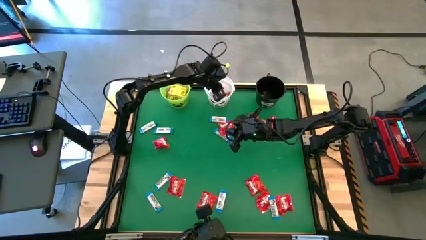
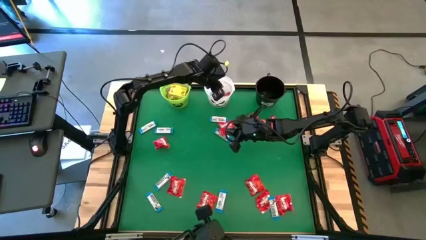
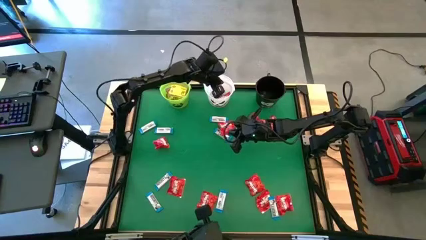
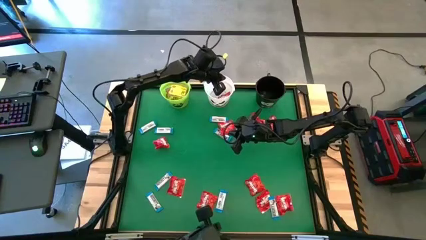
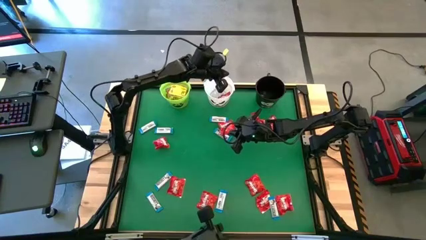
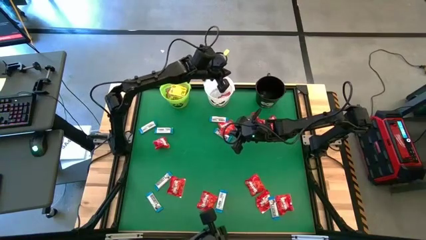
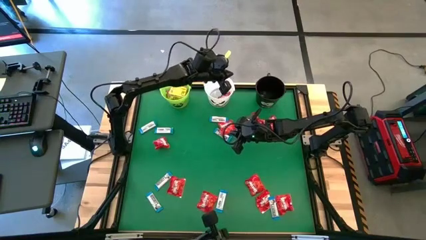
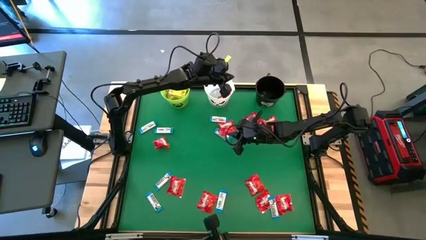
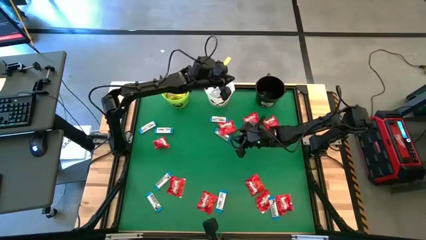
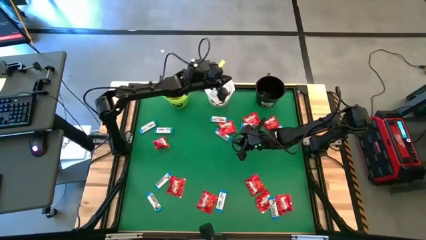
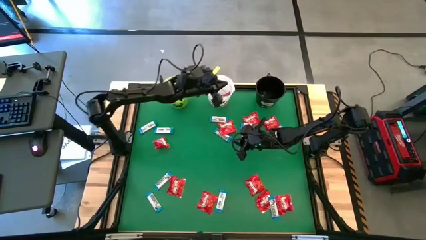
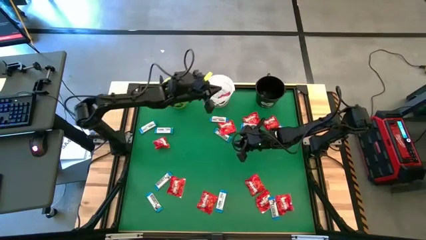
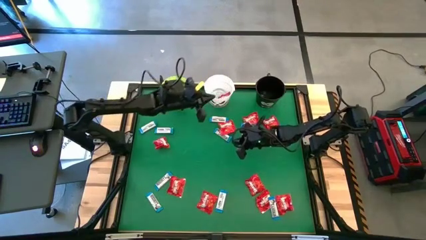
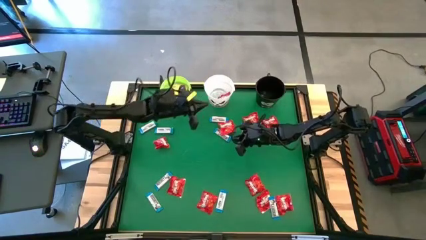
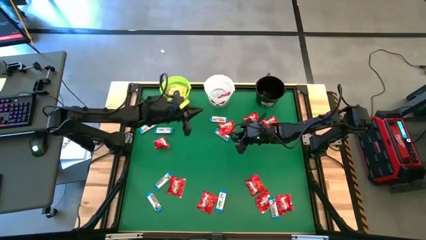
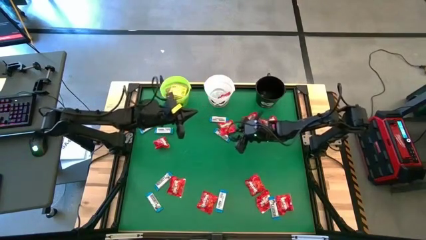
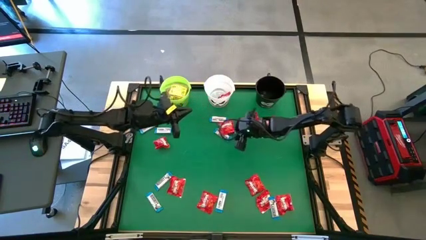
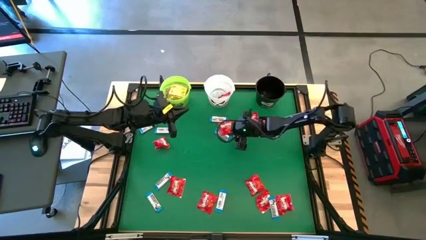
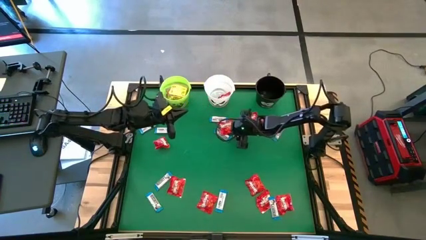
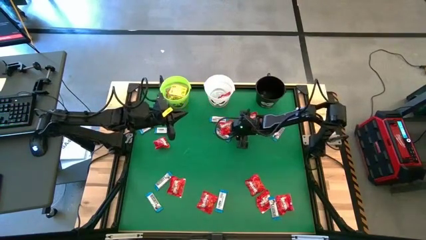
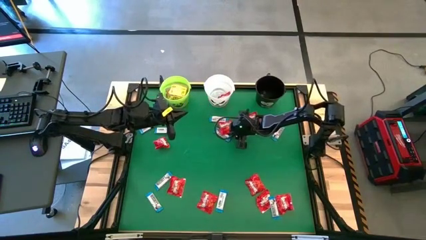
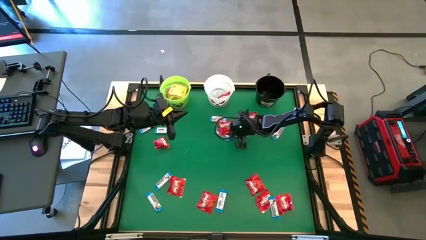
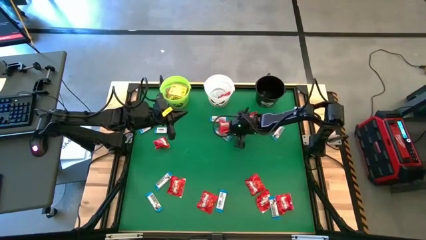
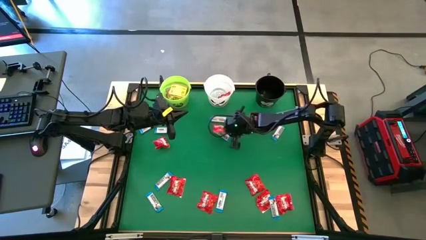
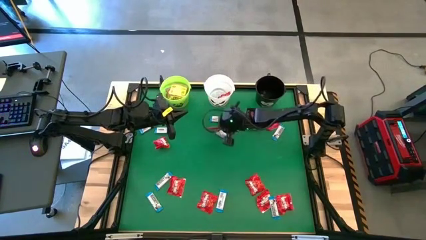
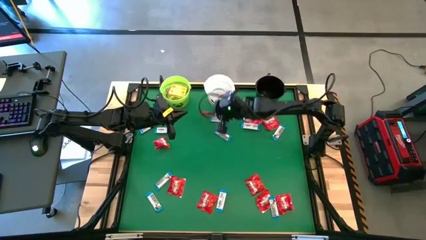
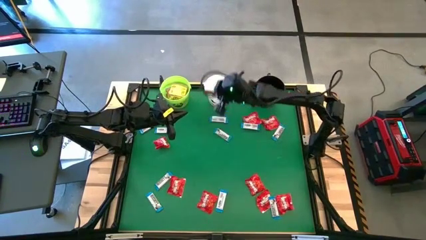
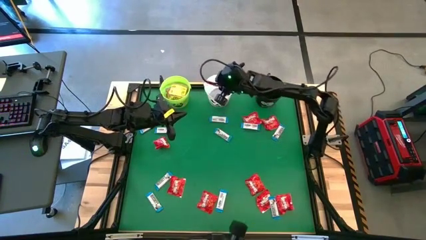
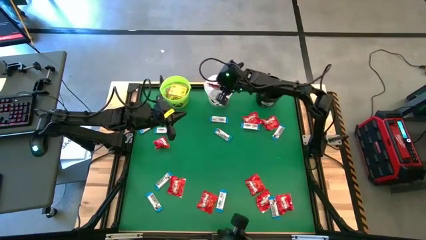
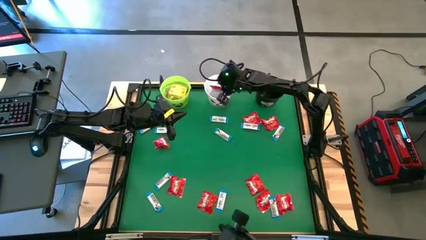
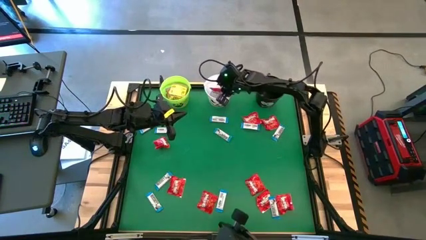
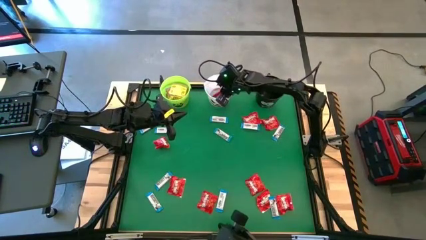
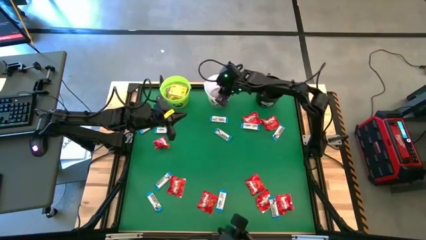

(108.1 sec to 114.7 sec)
Task: Sort candy by brand, put in halloween buckets
Put the red candy into the white bucket

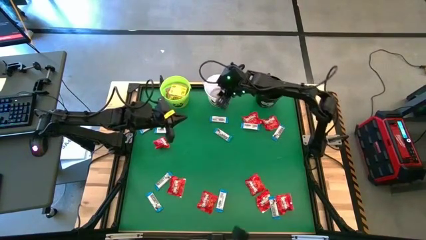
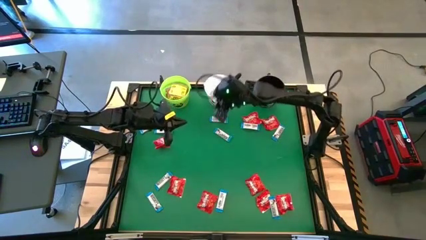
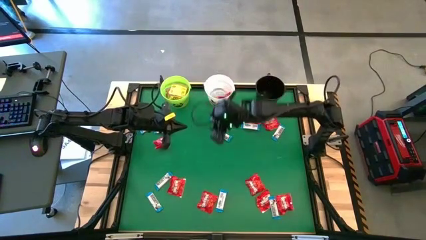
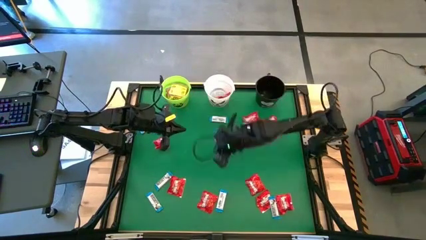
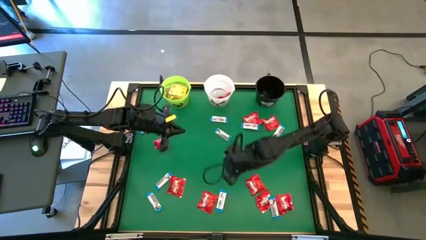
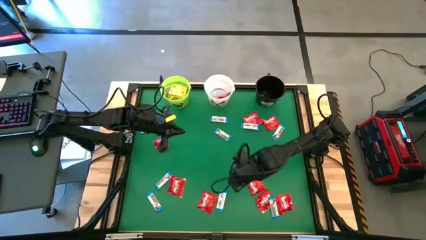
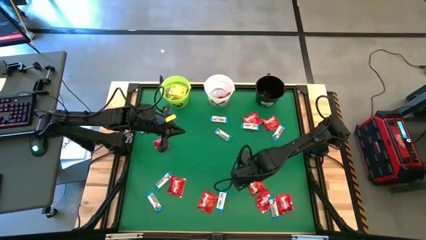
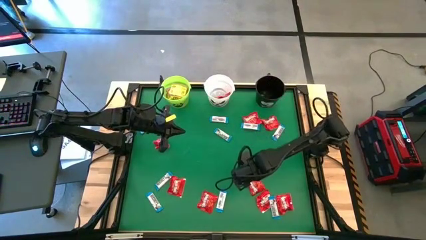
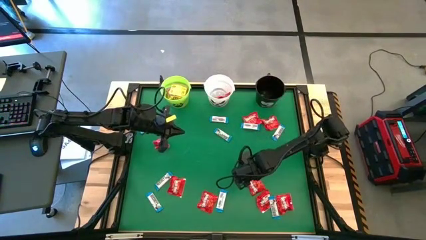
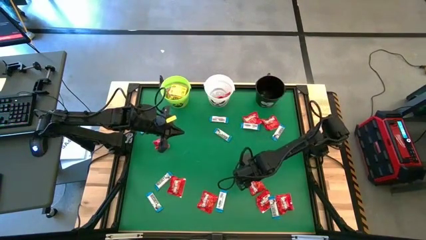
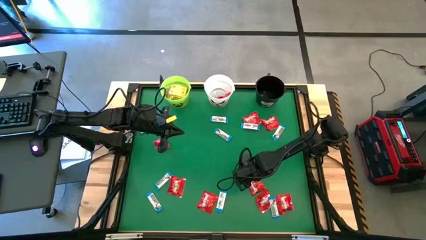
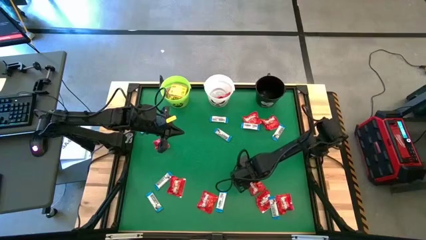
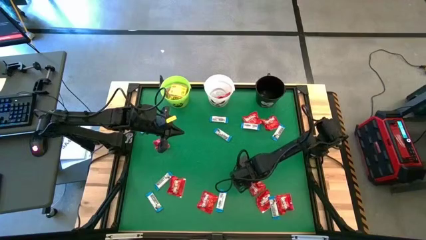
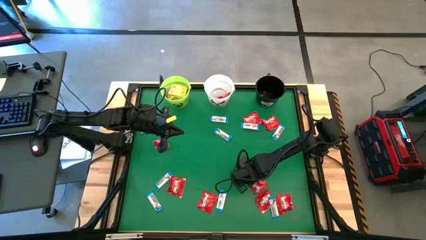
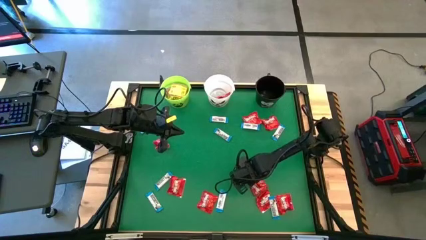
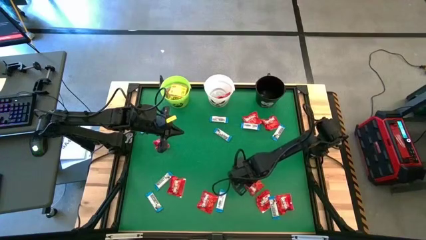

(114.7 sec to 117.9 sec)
Put the red candy into the white bucket

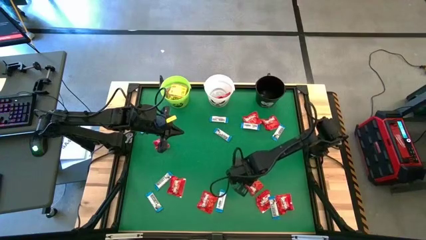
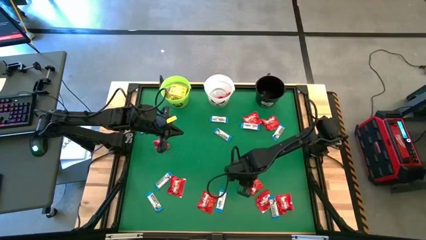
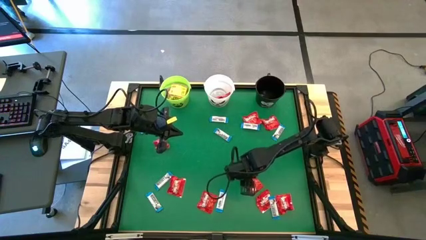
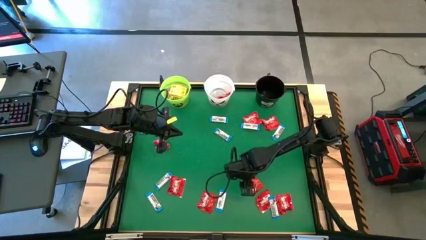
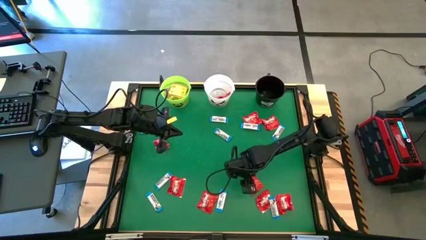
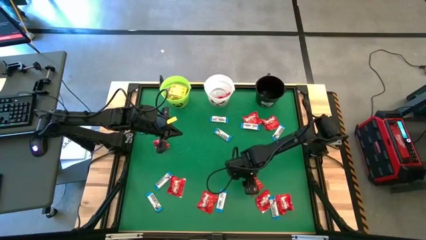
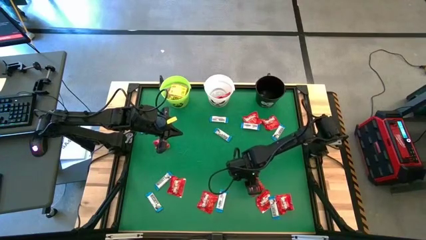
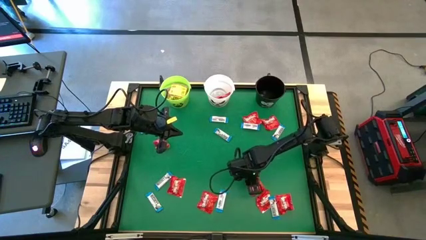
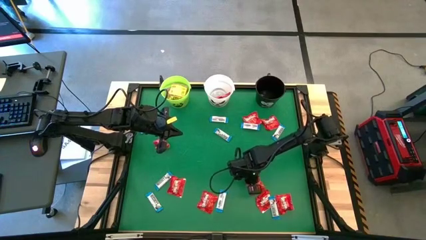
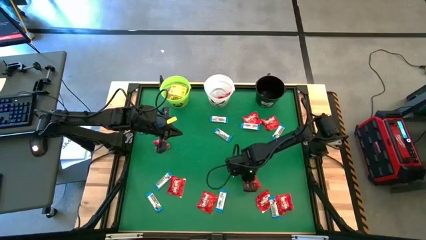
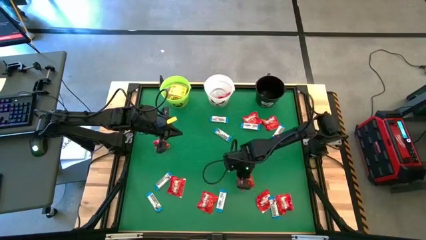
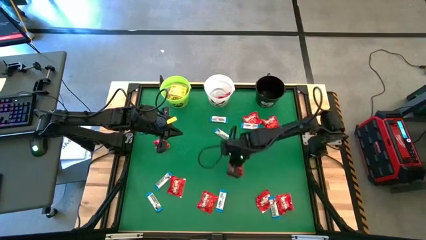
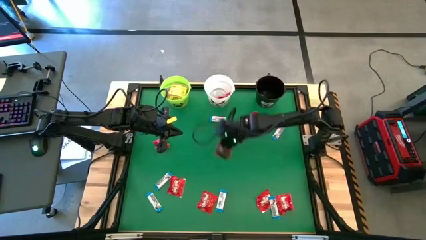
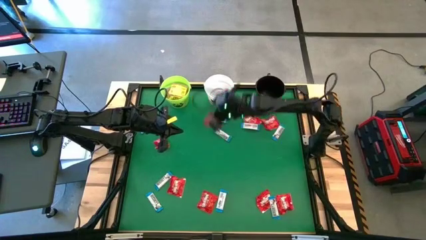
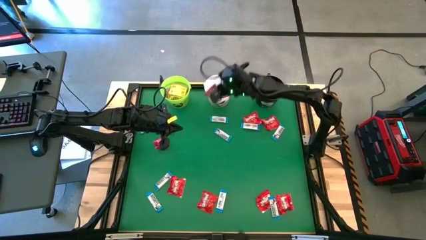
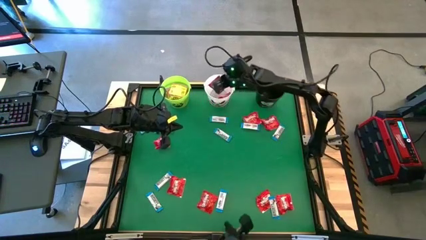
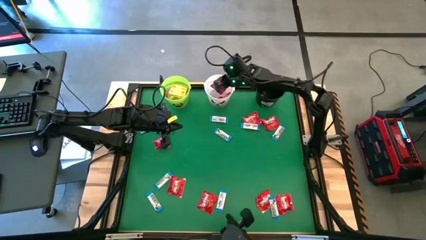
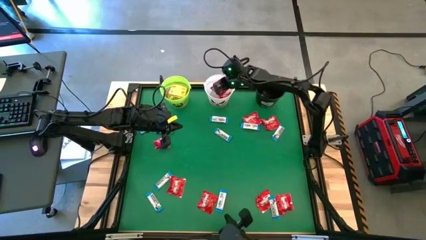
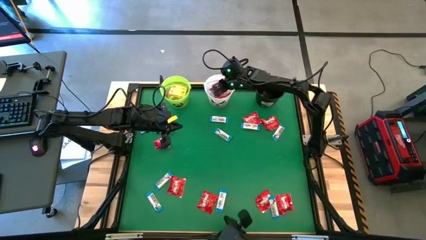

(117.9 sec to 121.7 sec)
Put the red candy into the white bucket

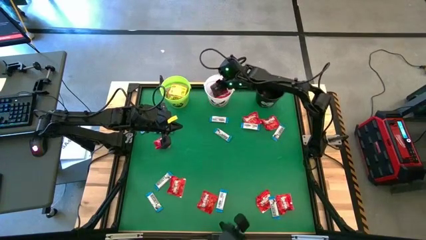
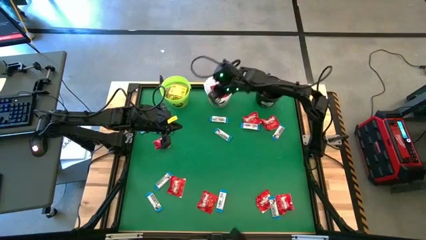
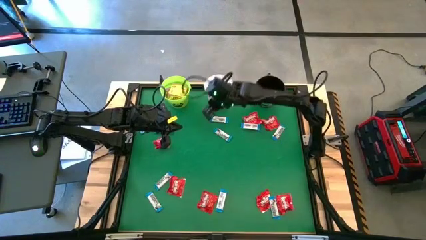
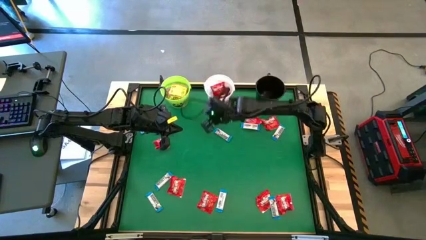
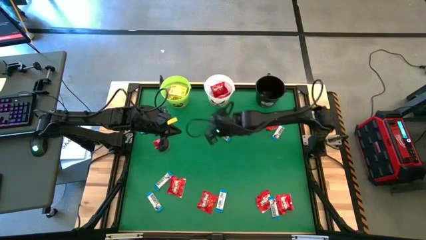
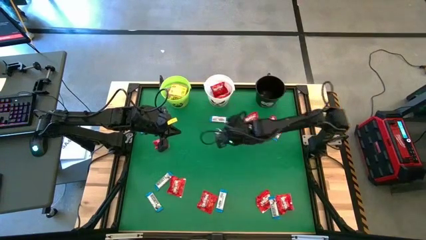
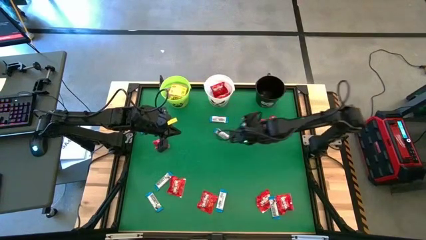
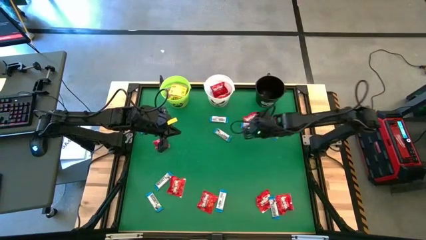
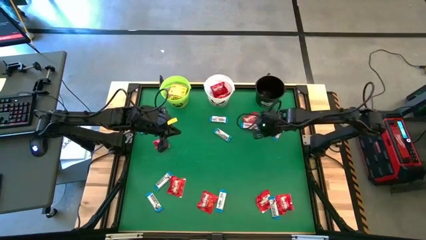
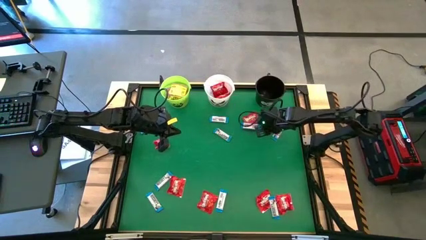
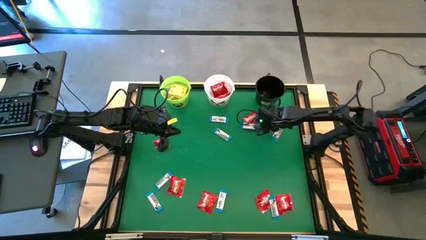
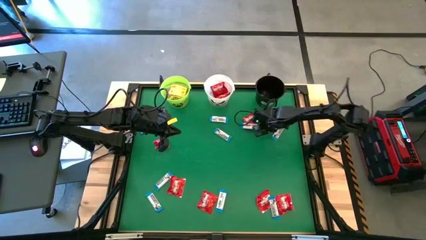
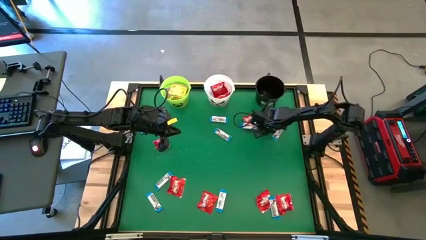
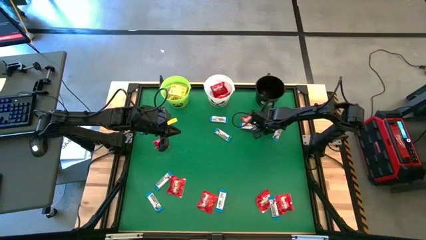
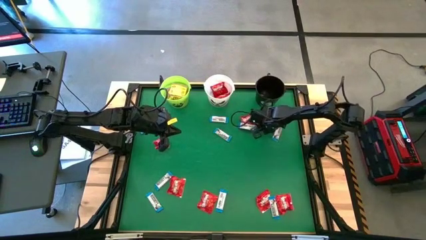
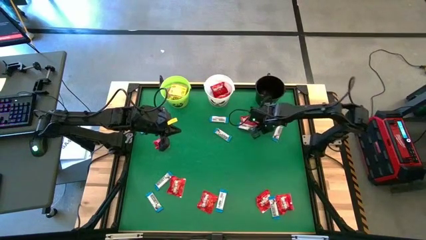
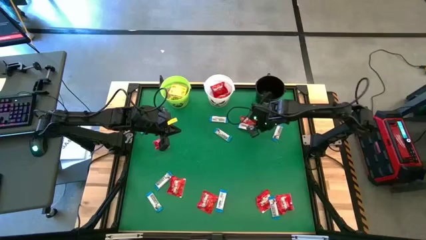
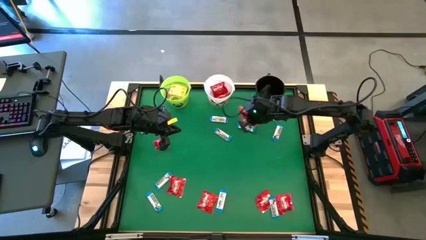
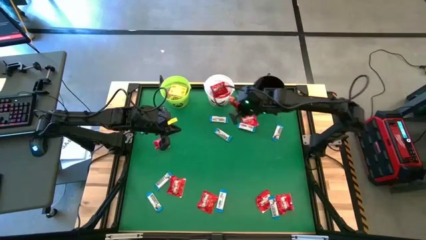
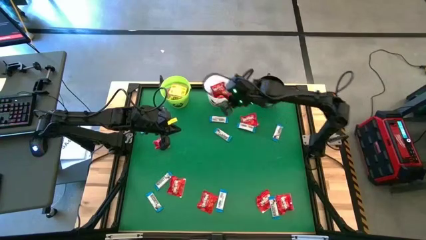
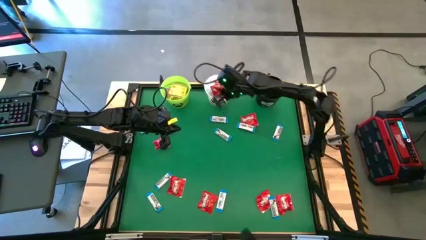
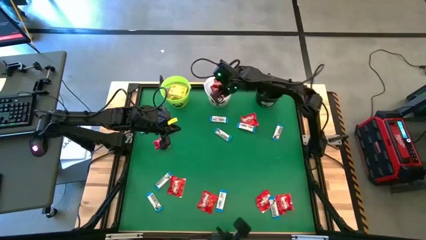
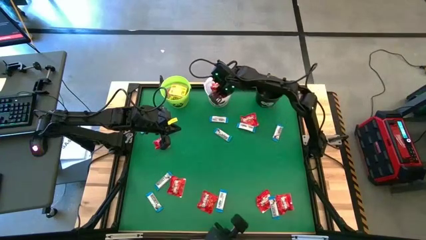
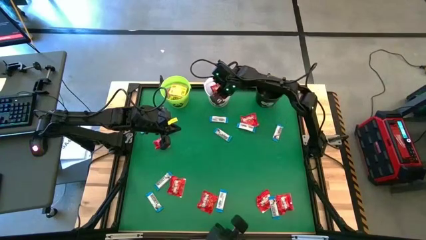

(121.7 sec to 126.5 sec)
Put the red candy into the white bucket
